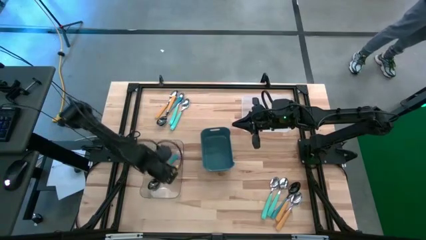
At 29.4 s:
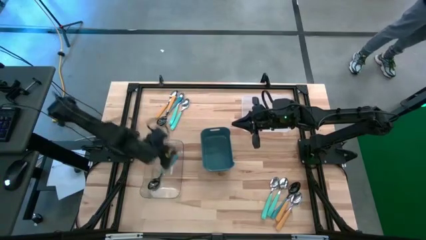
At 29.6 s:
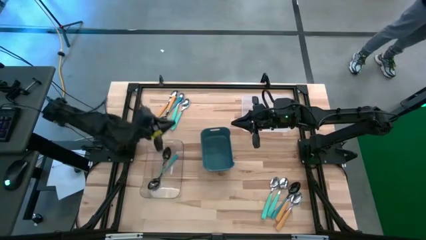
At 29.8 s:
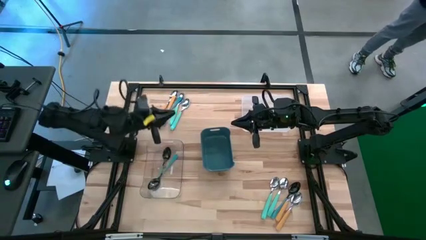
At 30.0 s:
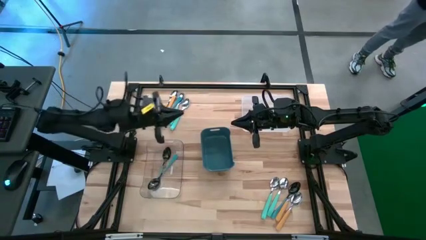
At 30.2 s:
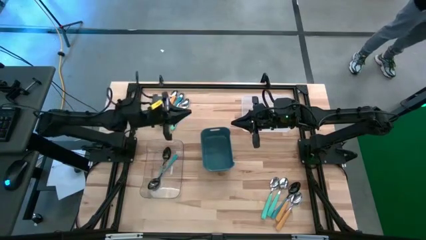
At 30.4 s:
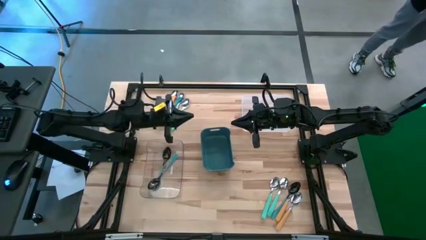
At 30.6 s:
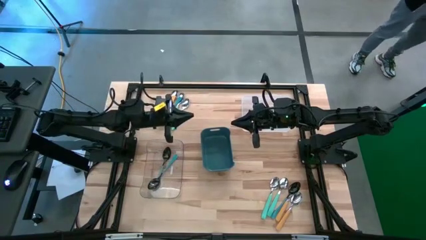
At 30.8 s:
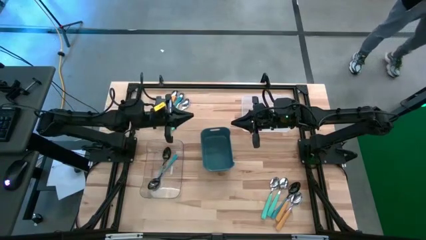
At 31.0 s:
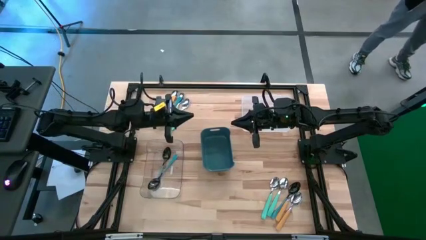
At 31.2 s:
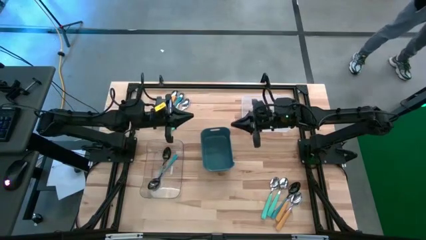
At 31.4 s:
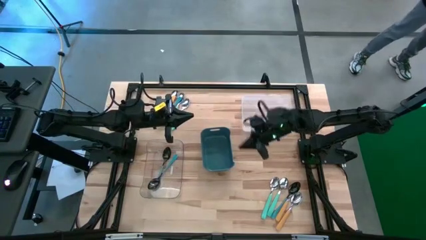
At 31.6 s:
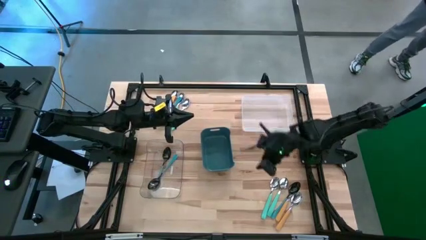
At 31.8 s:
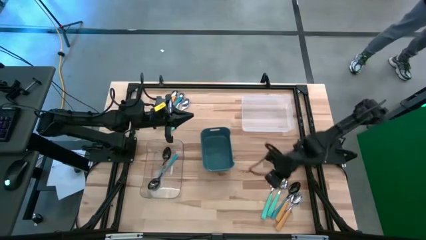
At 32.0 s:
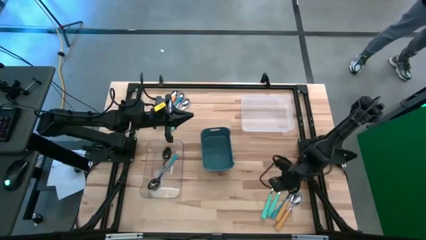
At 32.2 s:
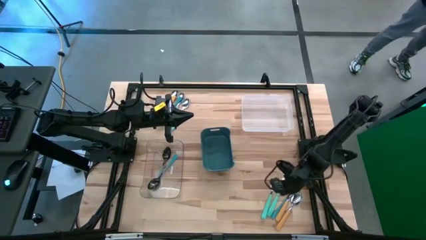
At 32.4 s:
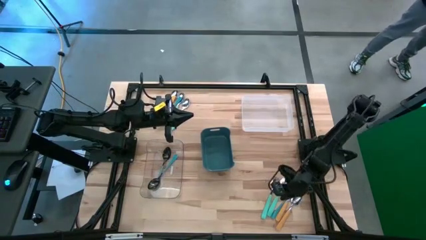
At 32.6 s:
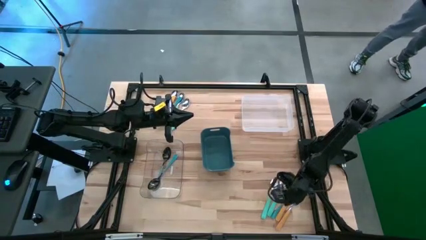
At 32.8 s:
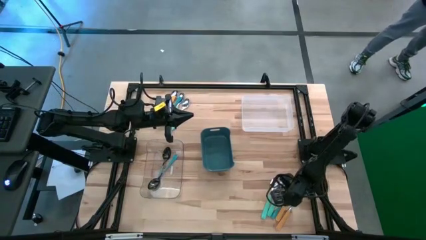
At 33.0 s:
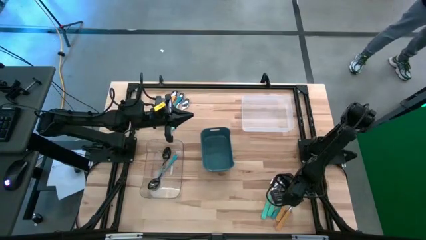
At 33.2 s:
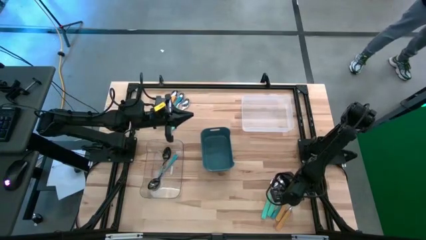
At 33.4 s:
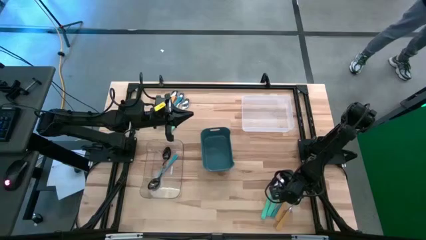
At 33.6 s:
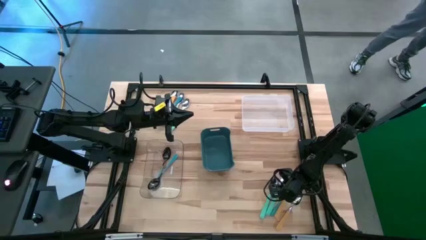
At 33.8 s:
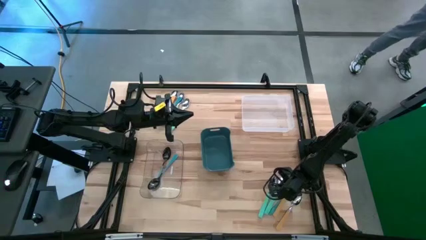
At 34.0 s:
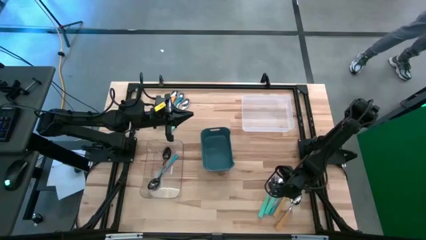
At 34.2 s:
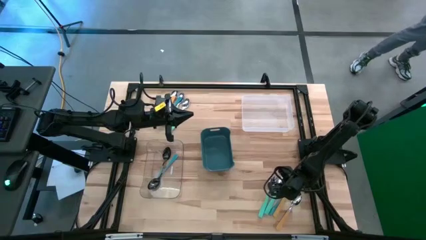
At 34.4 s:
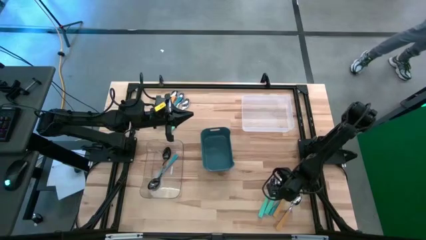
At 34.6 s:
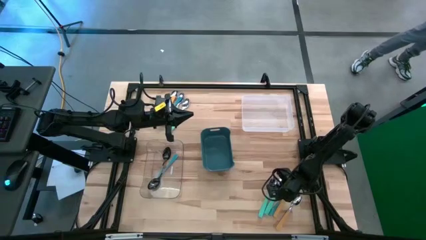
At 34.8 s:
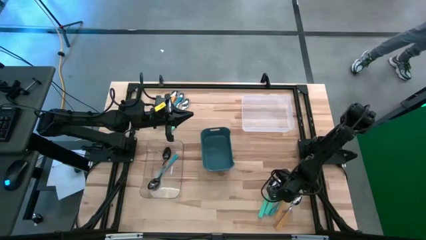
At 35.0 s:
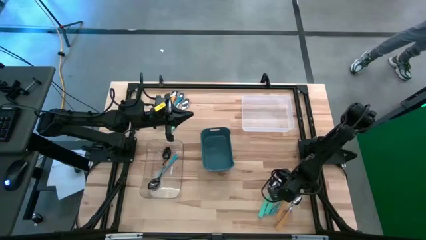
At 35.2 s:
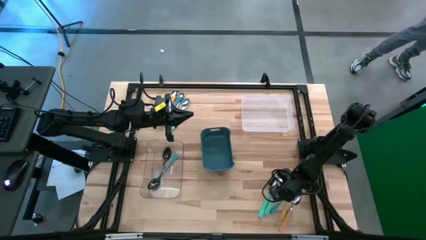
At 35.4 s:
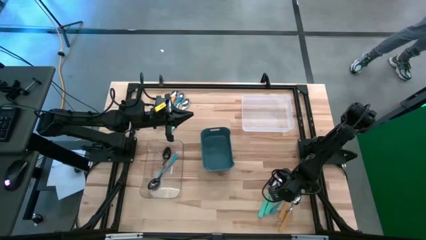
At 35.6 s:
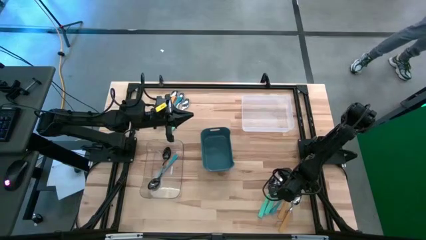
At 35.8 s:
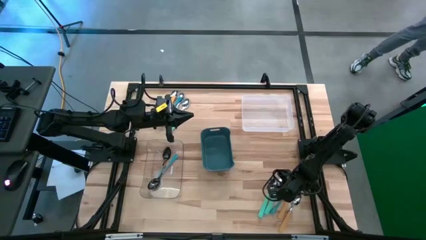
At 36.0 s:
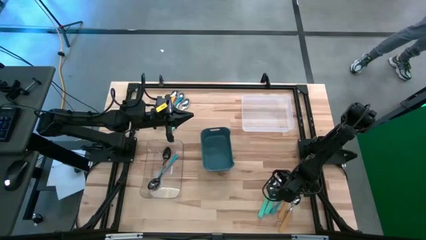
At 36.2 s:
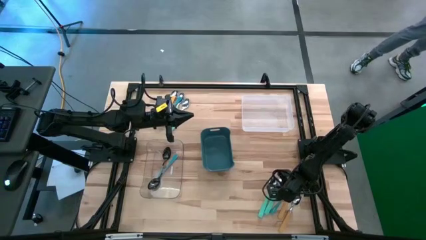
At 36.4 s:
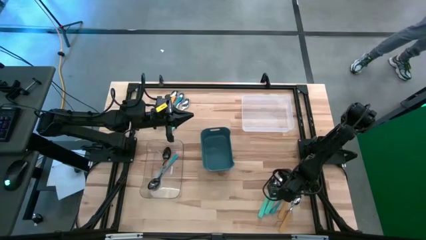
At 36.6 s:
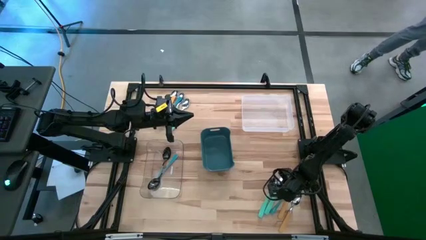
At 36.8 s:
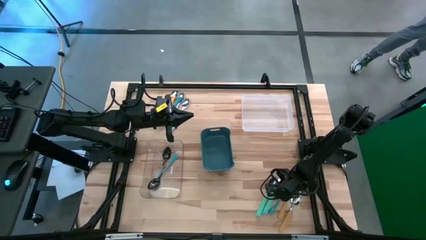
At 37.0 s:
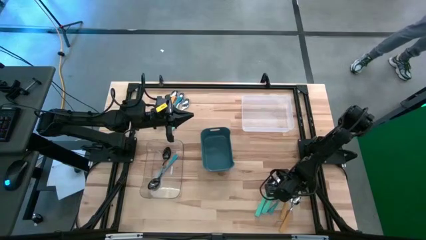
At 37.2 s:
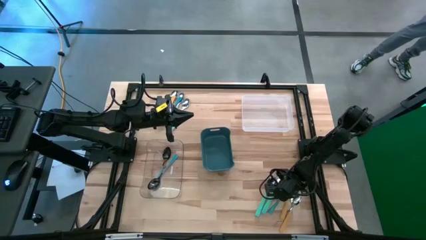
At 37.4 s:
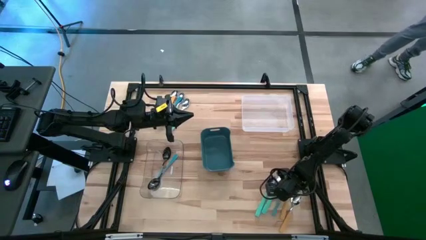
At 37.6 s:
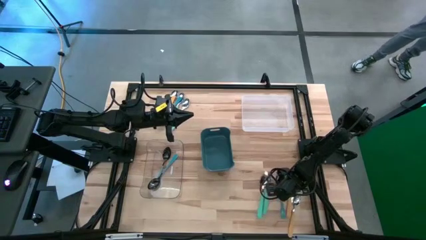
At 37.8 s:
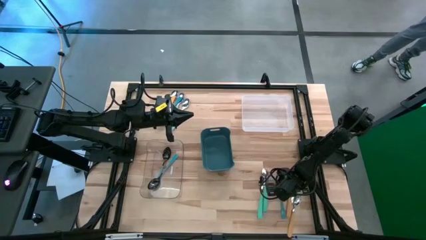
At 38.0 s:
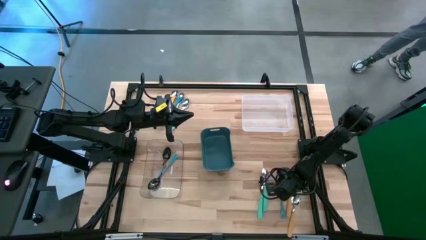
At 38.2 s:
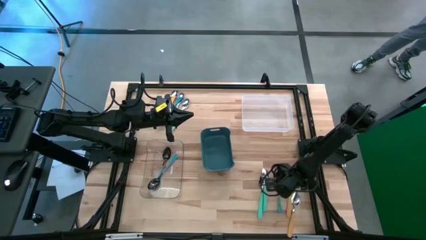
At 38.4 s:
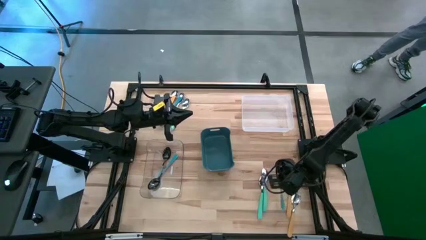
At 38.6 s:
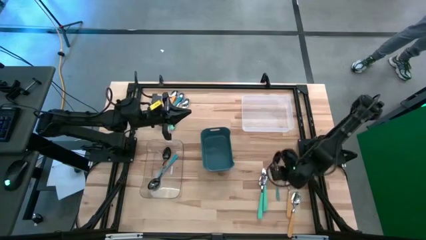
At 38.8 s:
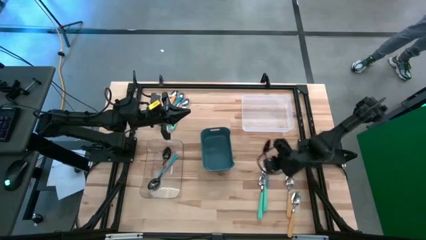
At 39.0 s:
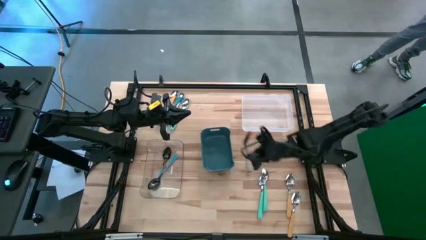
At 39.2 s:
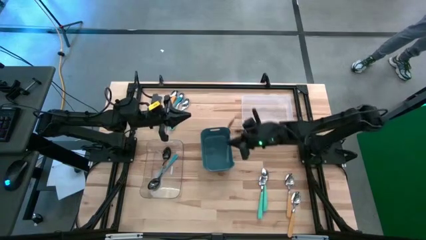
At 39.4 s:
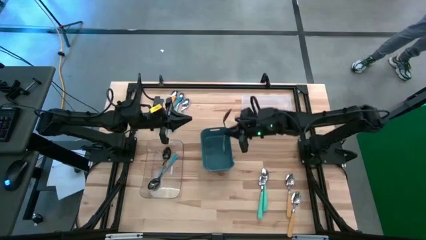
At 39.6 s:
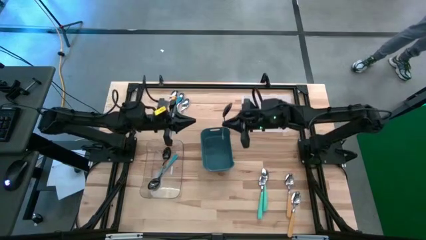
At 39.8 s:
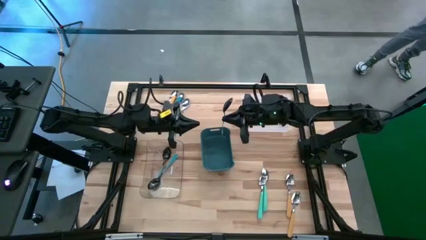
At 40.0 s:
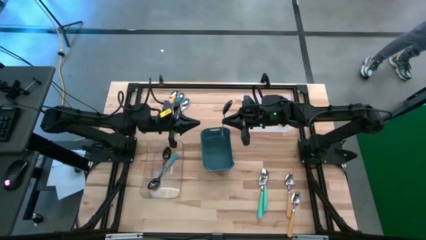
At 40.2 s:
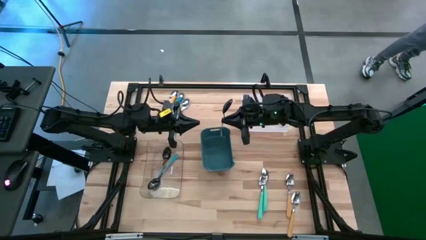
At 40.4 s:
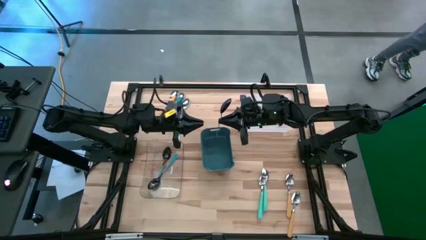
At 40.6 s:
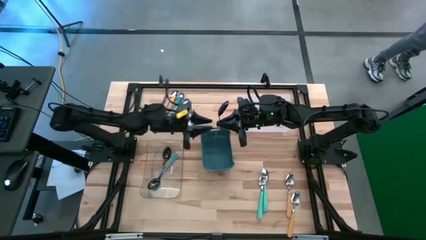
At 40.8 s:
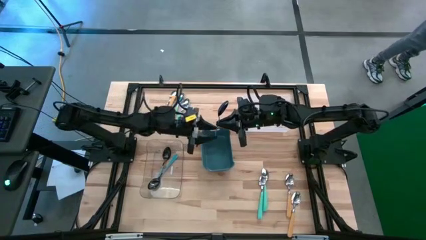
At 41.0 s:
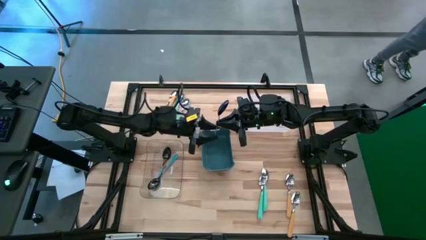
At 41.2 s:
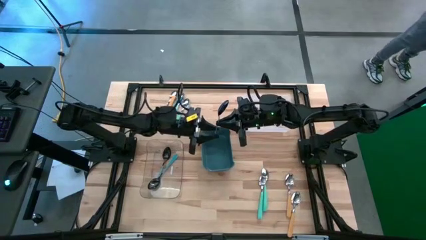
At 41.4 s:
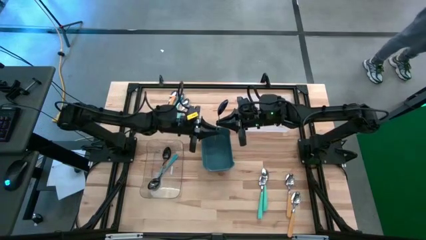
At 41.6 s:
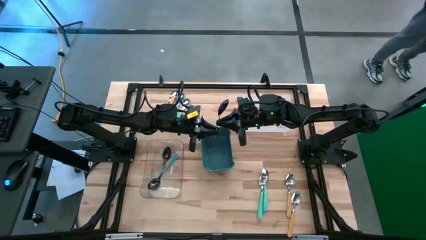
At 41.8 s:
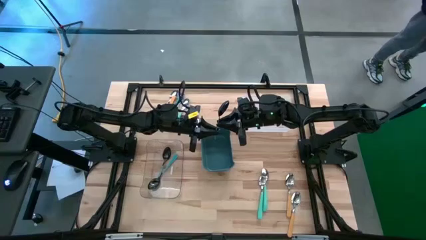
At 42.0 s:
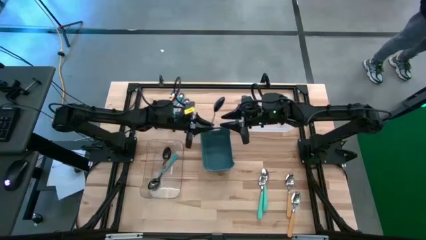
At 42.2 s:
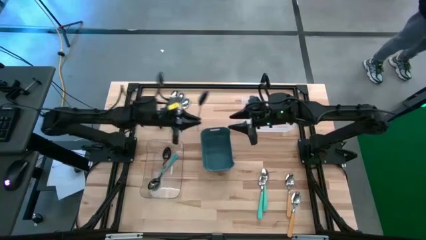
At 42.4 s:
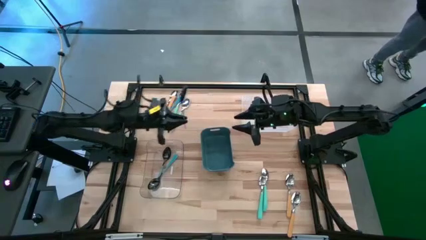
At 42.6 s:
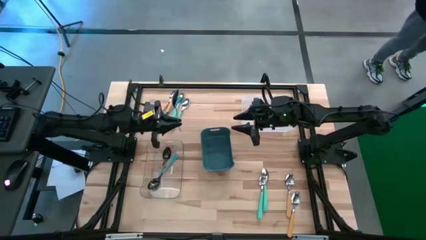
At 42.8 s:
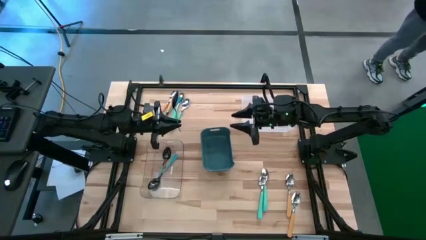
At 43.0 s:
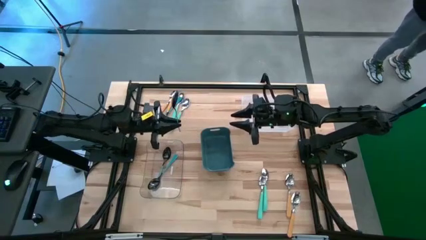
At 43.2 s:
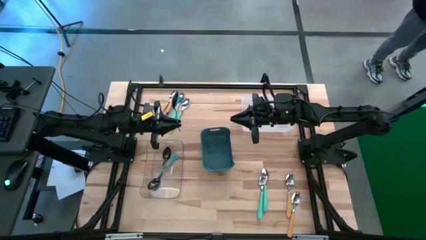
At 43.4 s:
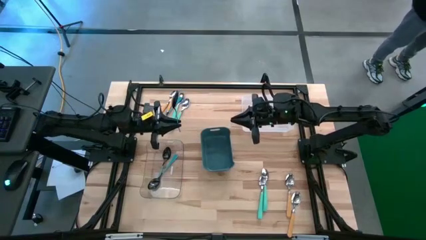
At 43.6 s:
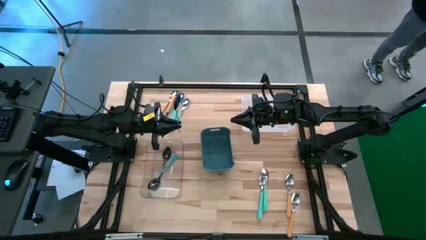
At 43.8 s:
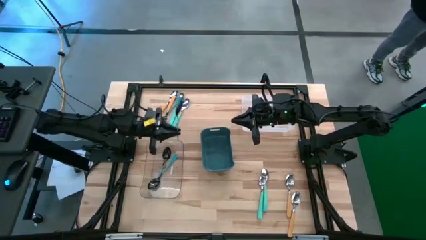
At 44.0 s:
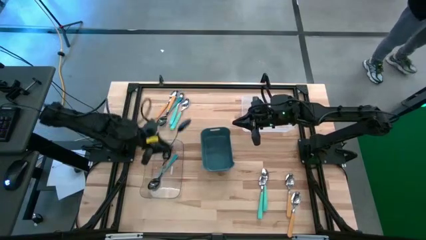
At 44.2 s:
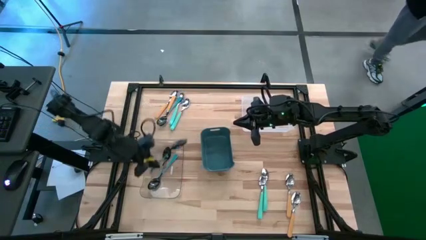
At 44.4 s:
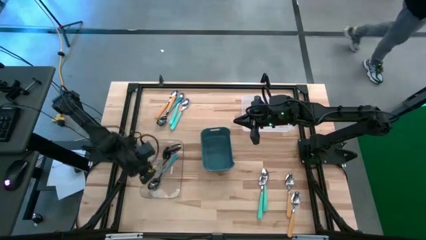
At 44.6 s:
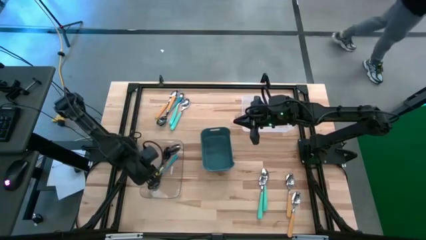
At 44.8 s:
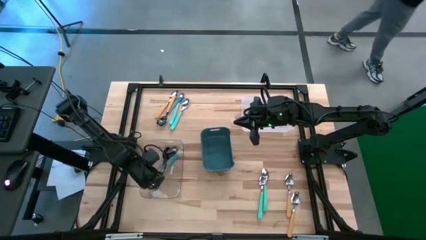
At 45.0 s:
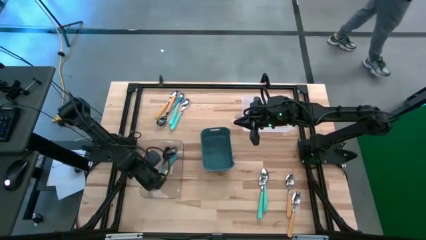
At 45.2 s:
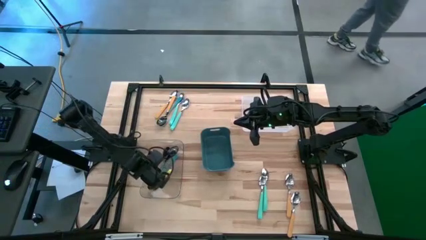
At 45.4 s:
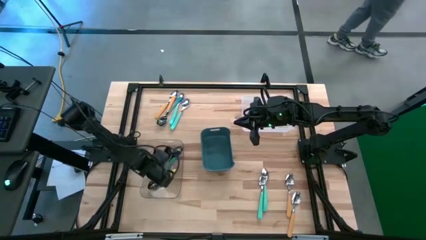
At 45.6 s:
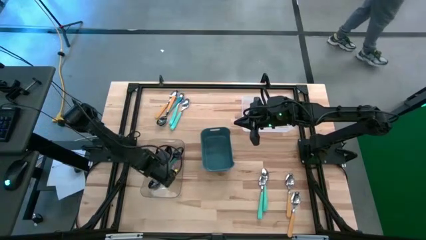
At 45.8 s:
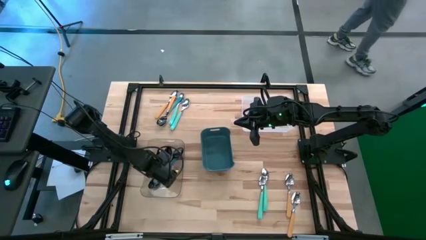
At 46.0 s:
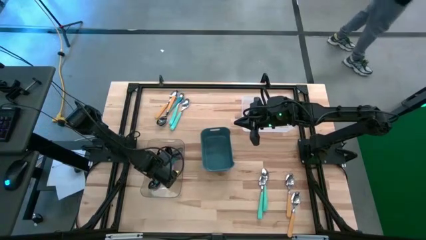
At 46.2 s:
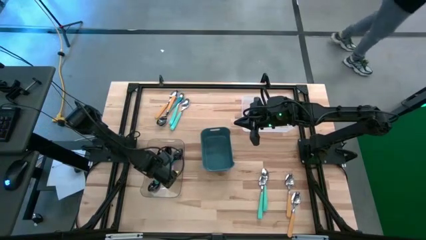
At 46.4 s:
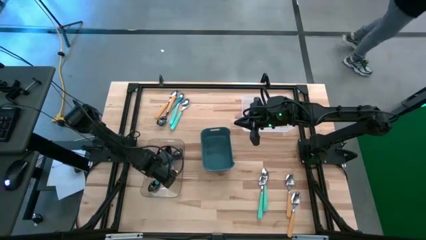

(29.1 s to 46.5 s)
Task: Sort silverware by color (type)
Put the blue spoon into the transparent bin
